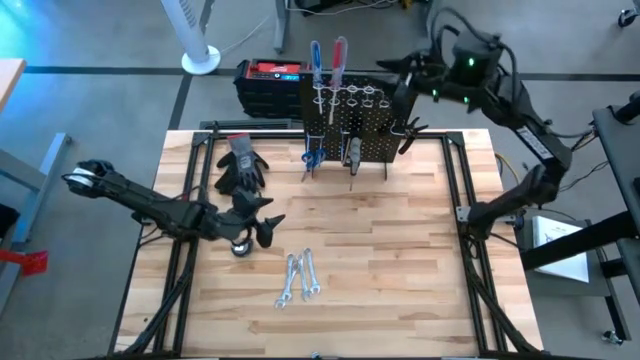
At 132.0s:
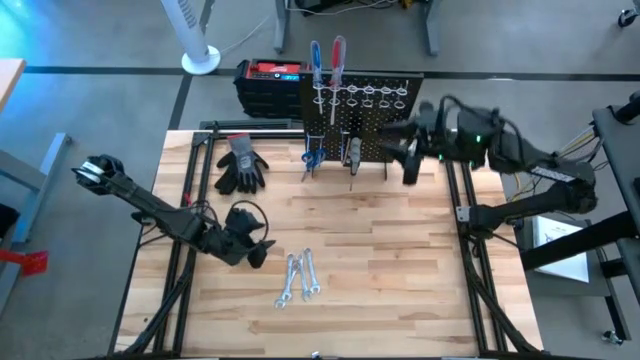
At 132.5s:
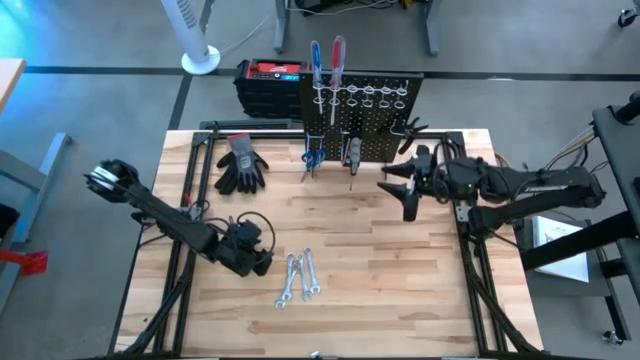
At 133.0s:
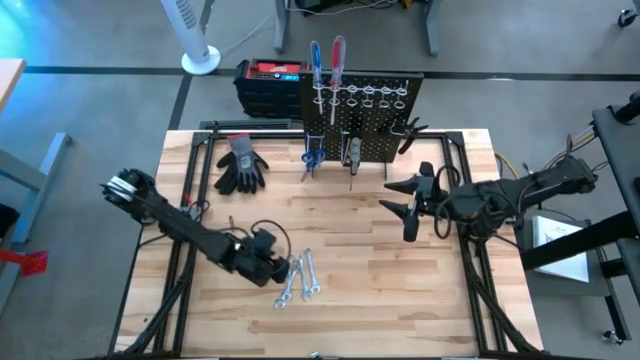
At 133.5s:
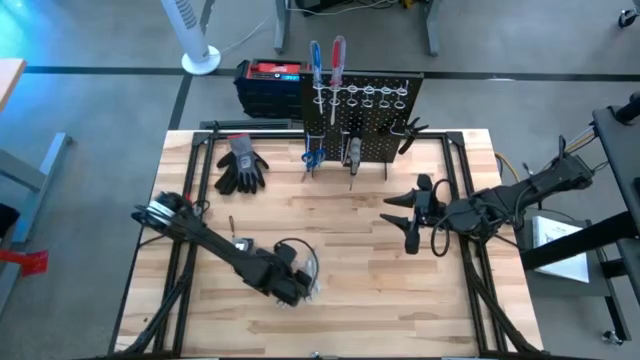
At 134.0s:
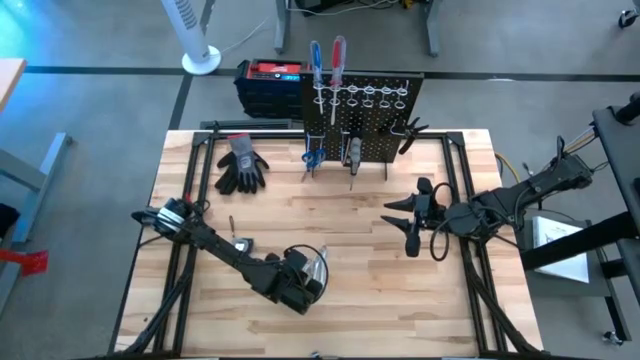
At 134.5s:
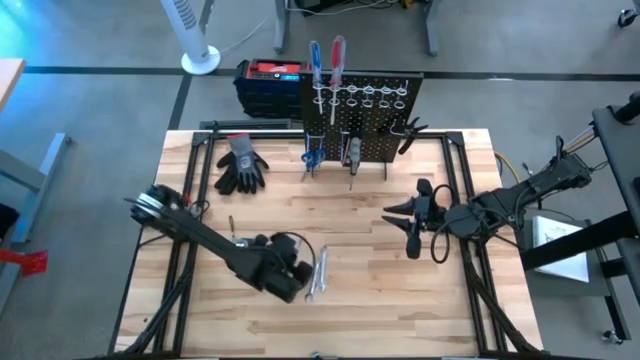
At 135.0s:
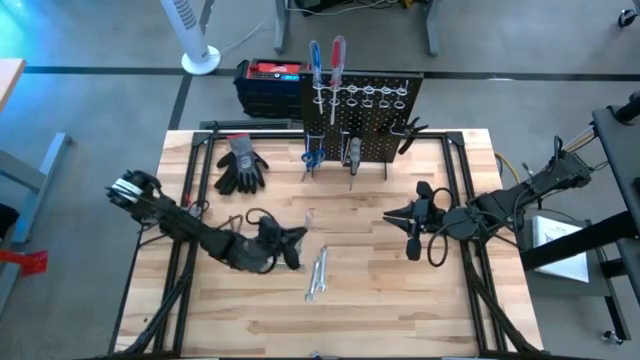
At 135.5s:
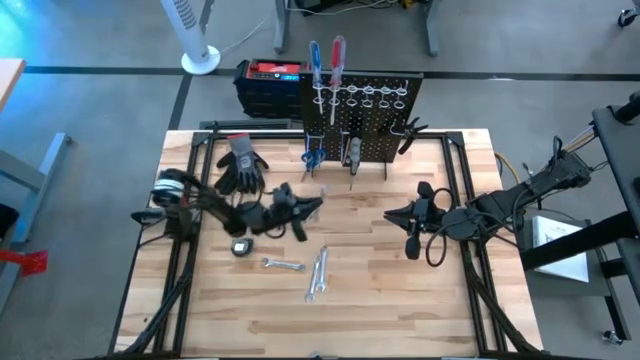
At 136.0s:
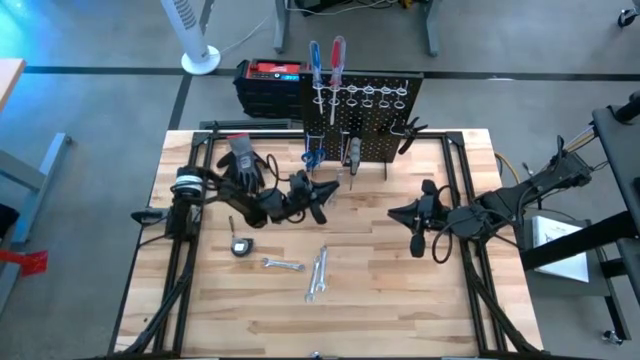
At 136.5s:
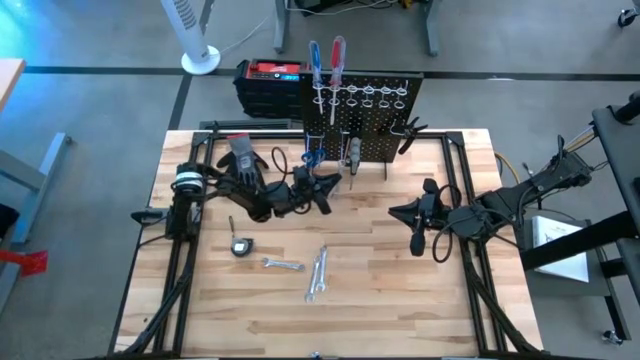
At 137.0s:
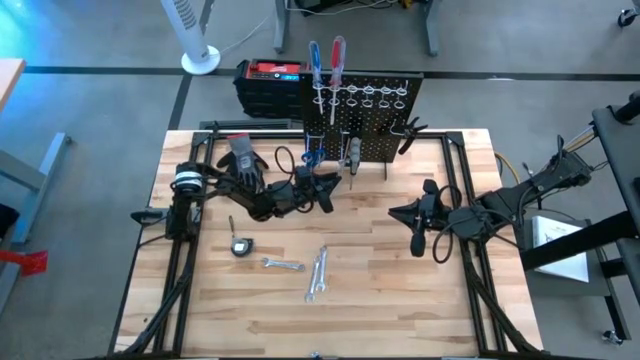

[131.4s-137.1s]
Task: Hang tools onto peg board
Hang the right silver wrench on the peg board

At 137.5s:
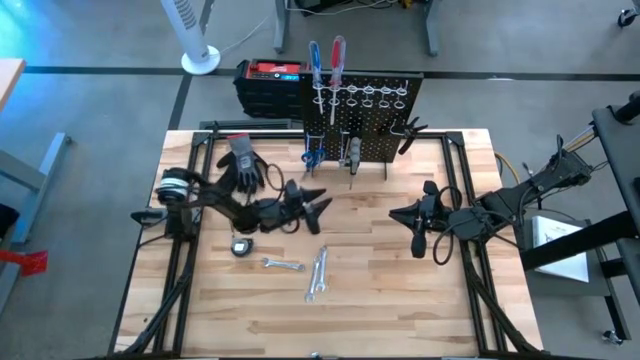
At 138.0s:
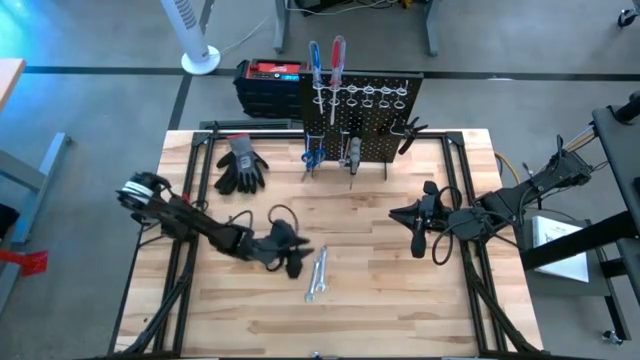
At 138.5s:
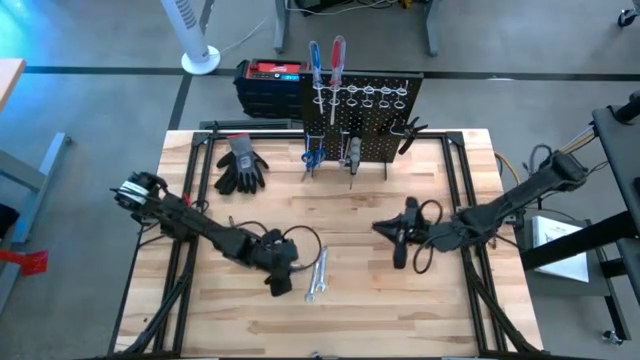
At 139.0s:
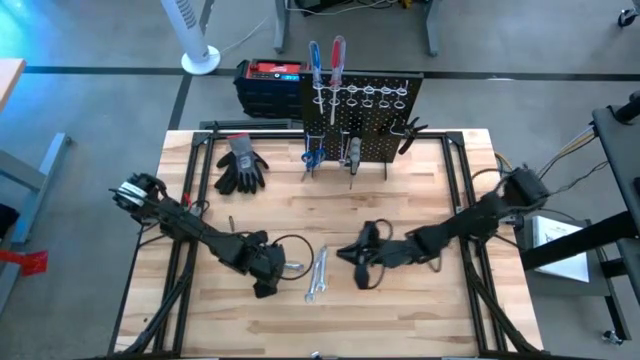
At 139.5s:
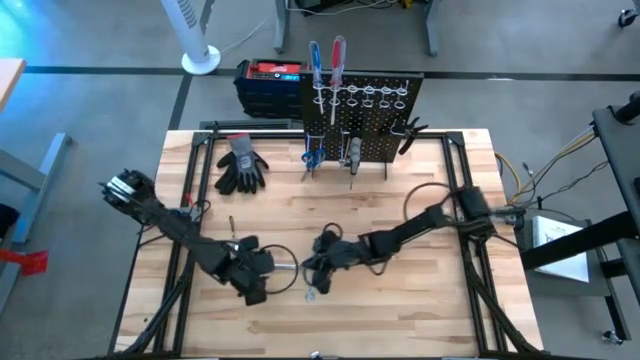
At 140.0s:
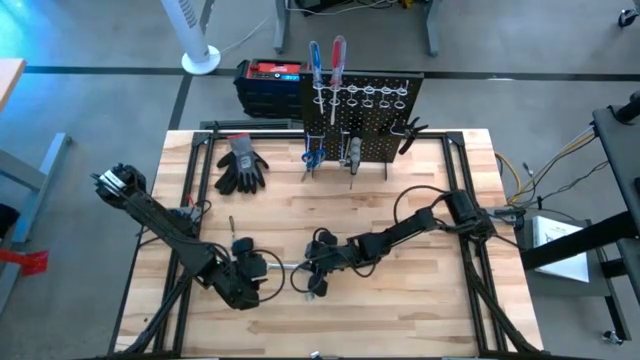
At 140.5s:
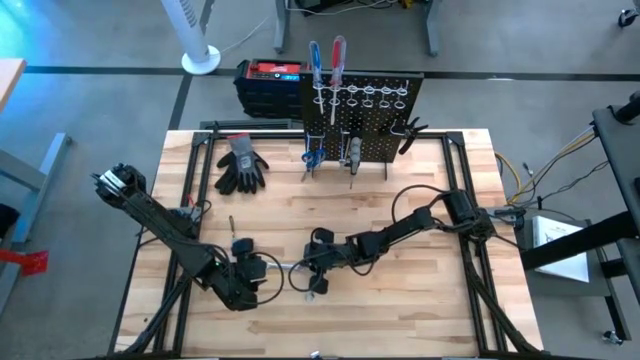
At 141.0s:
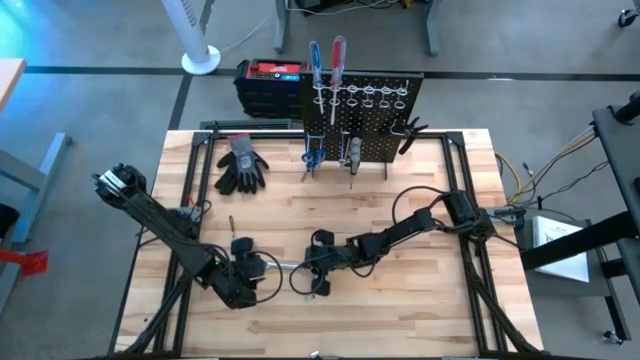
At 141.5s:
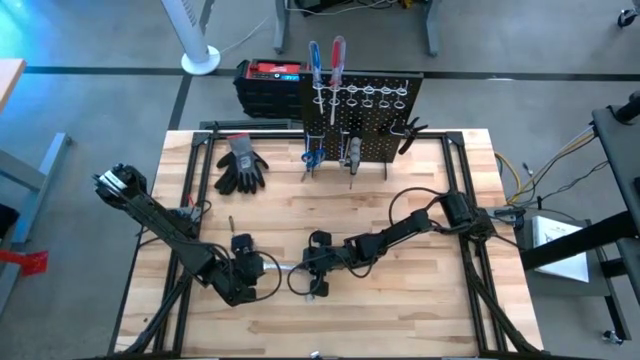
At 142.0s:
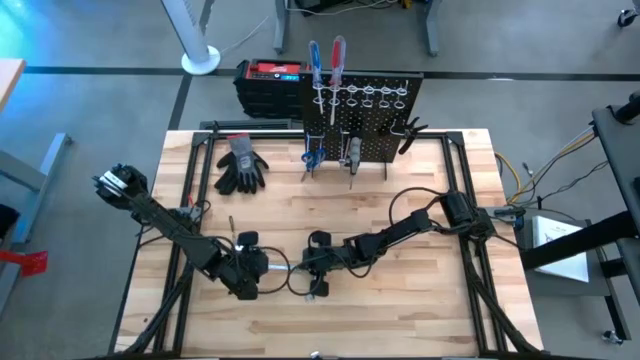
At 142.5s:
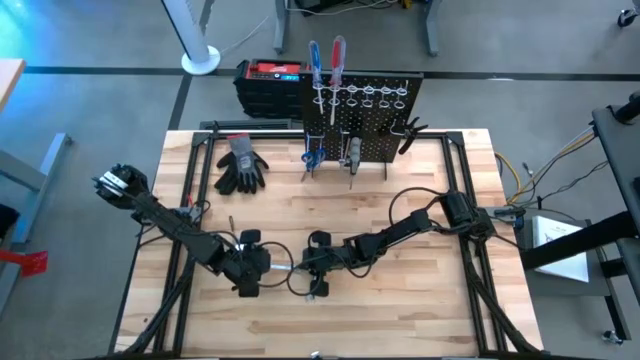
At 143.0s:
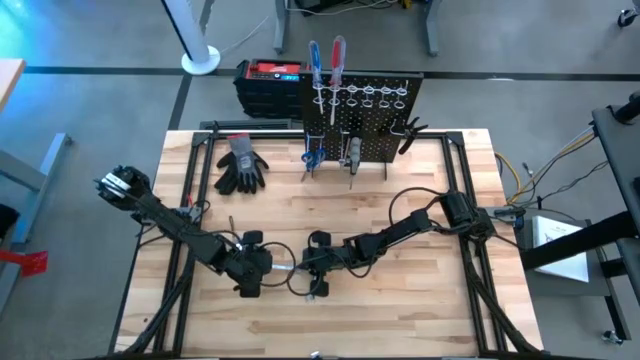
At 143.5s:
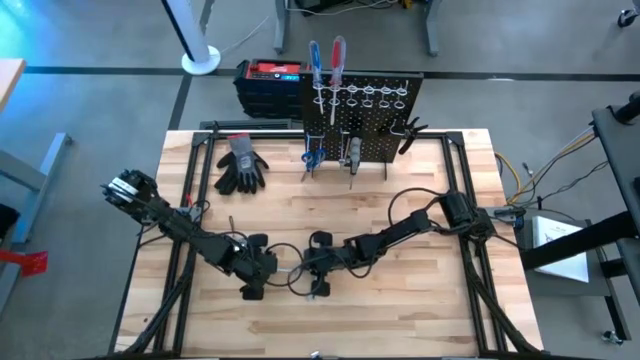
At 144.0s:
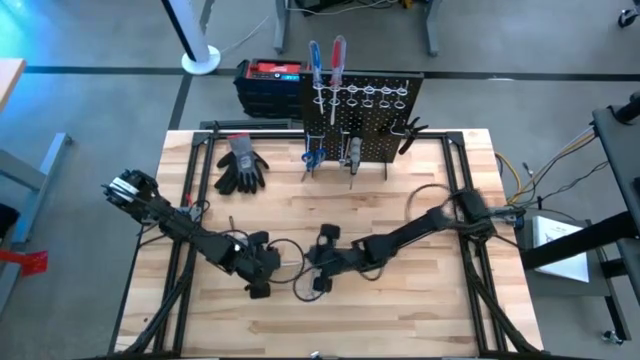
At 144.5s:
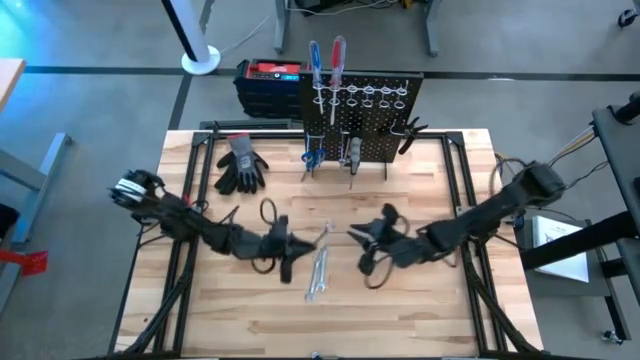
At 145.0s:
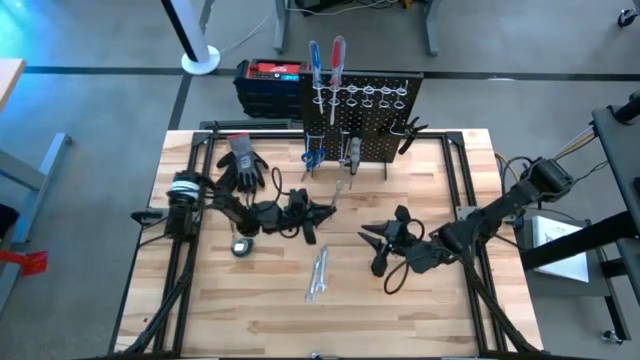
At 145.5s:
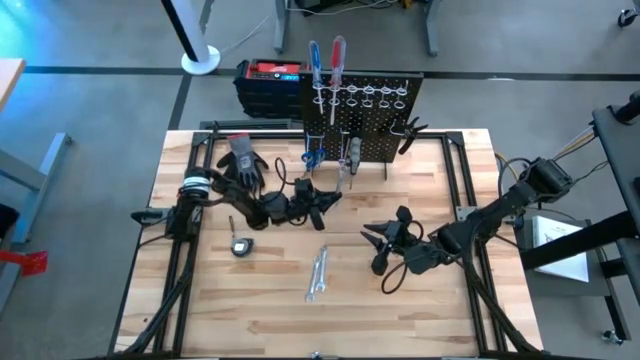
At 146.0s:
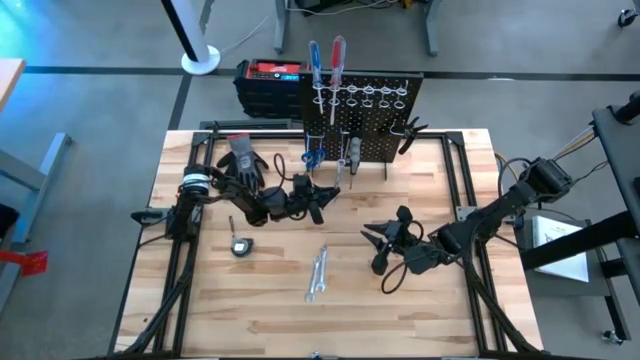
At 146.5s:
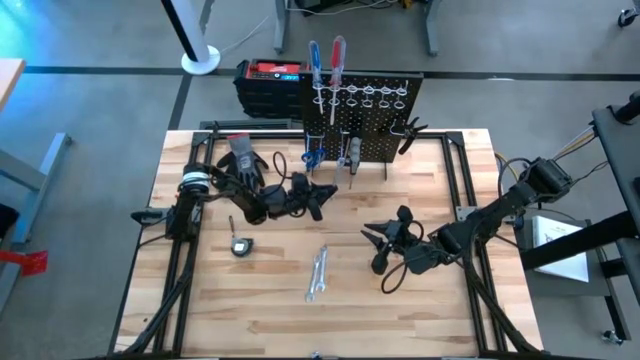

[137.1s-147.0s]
Hang the right silver wrench on the peg board

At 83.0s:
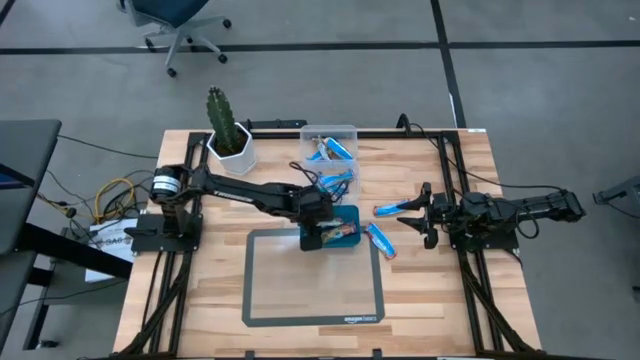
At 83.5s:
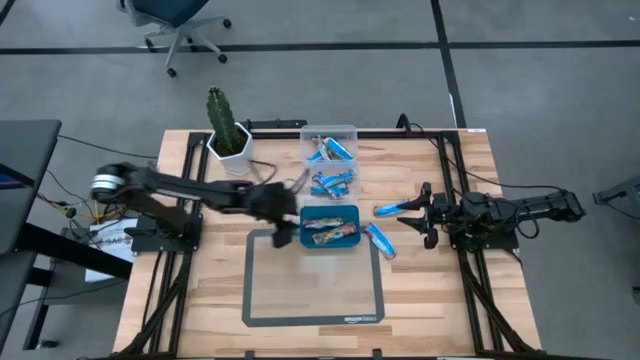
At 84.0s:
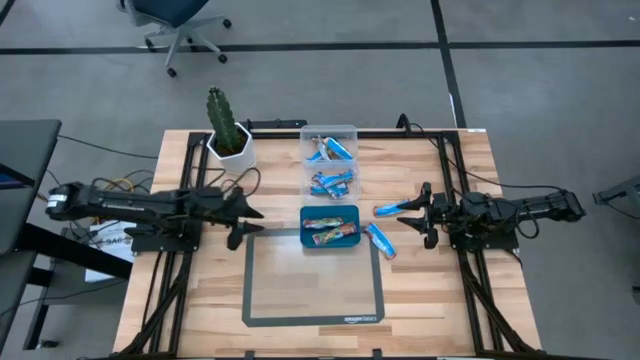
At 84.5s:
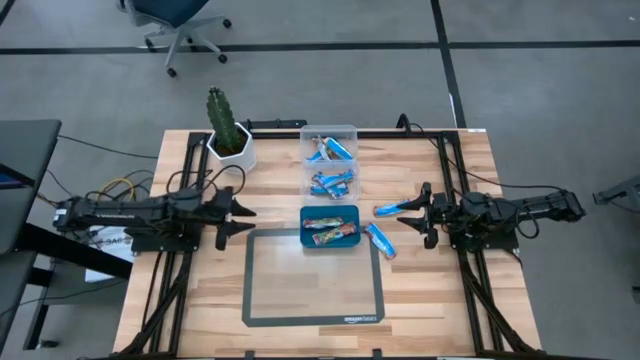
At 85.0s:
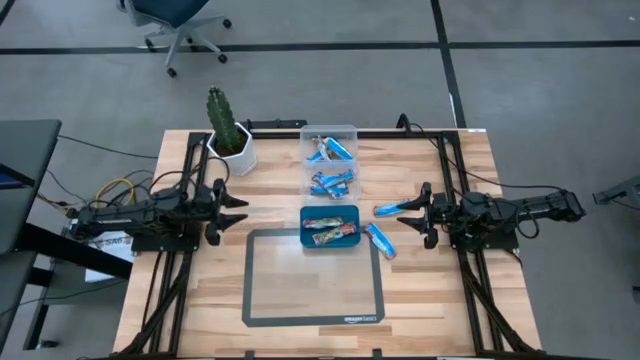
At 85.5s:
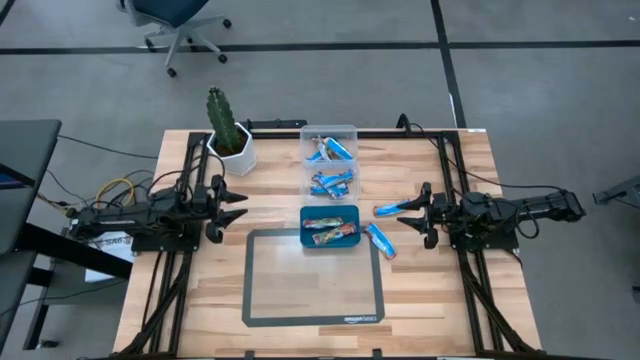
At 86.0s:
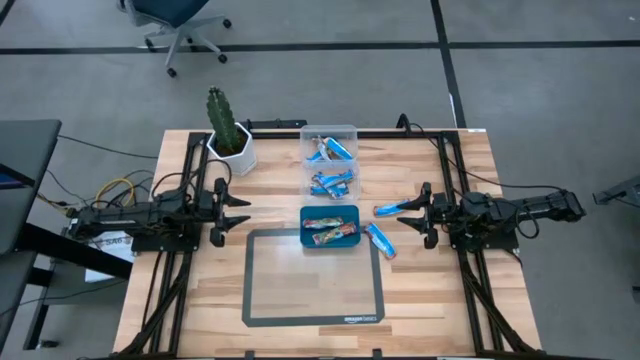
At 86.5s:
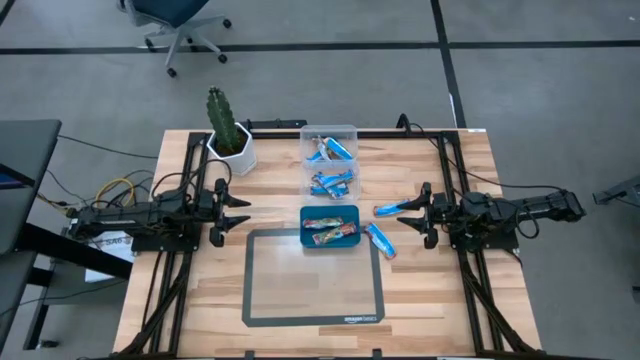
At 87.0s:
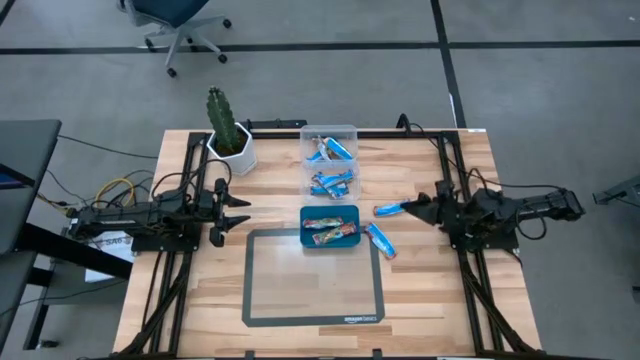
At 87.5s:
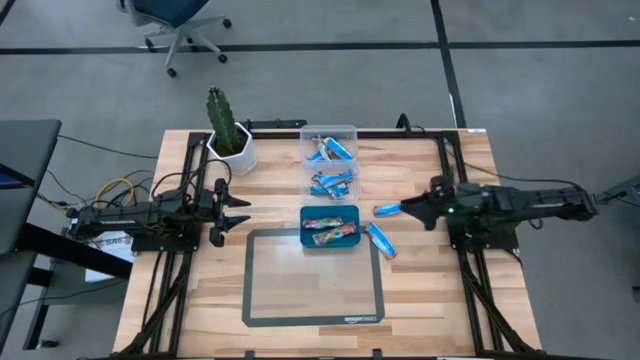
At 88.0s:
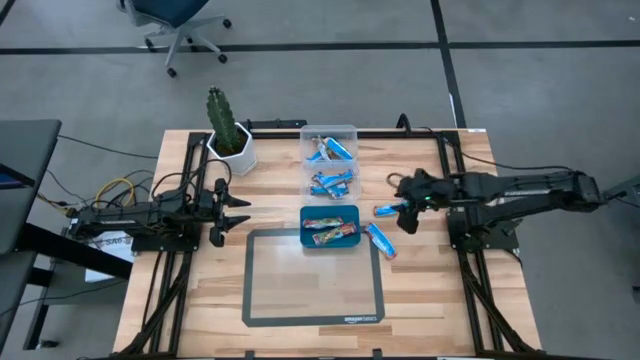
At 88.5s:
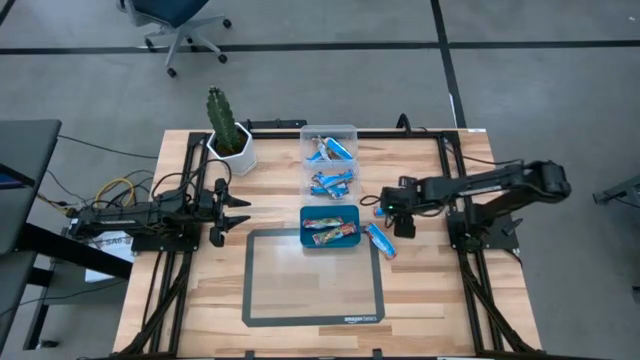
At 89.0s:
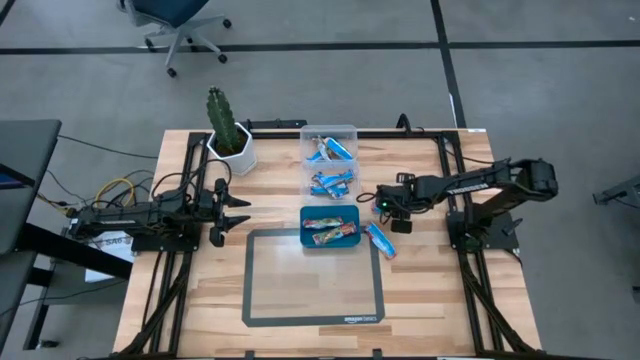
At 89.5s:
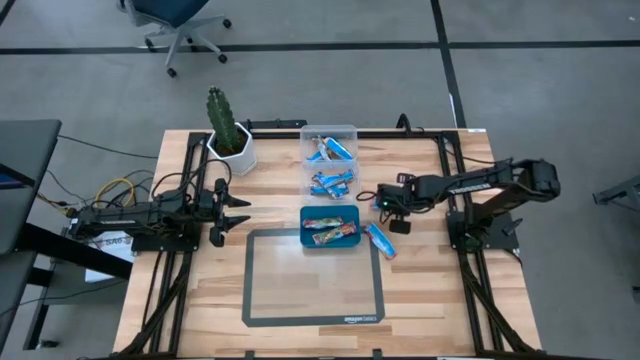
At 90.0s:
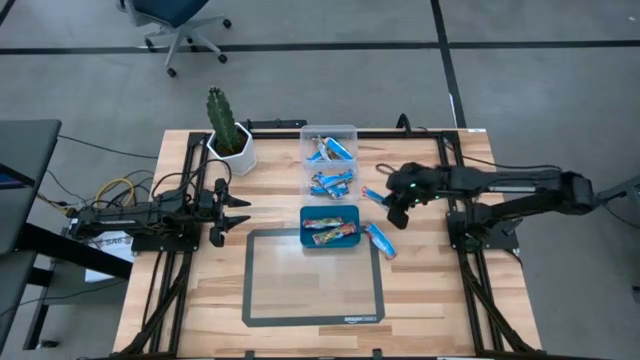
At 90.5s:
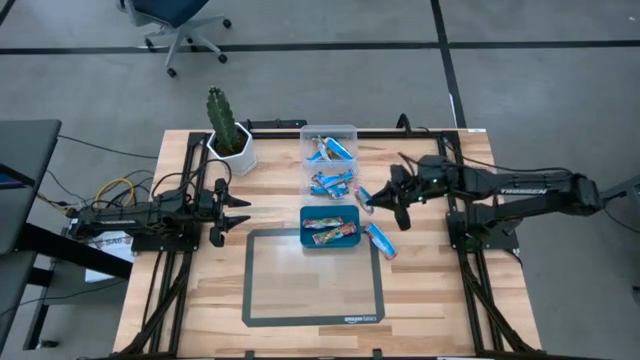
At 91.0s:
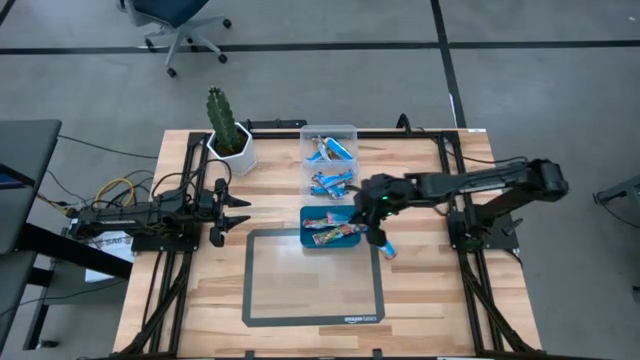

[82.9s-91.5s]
Task: Pick and place Granola Bars by type
Put the red granola bar into the blue bin
